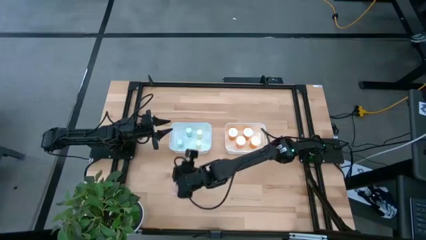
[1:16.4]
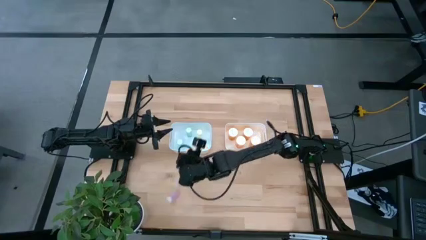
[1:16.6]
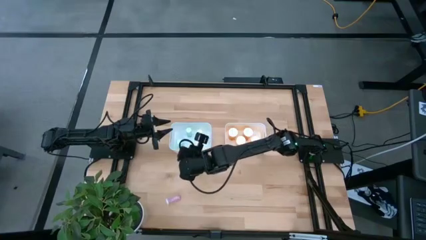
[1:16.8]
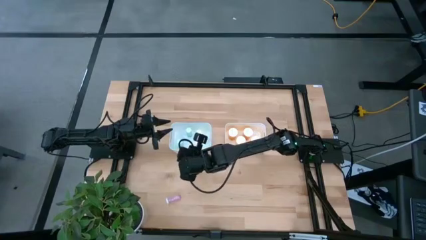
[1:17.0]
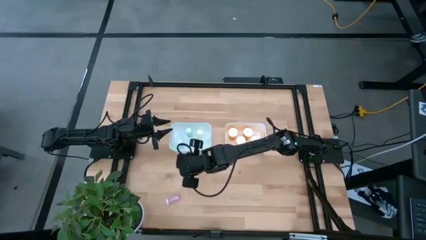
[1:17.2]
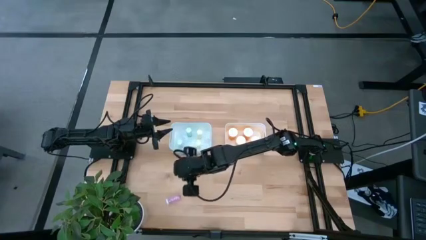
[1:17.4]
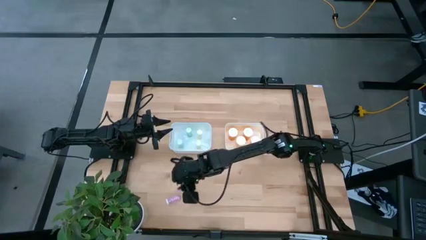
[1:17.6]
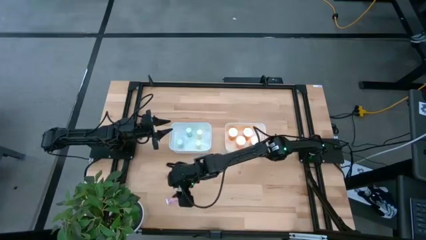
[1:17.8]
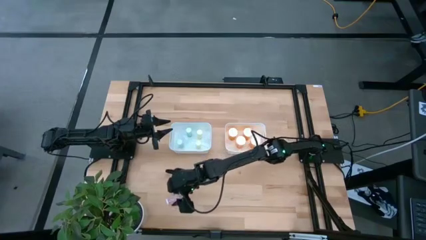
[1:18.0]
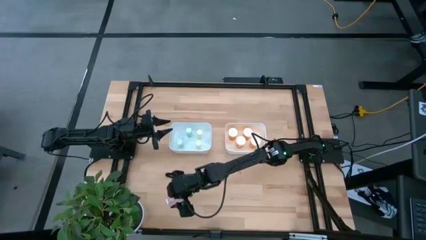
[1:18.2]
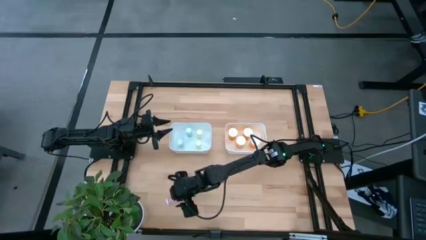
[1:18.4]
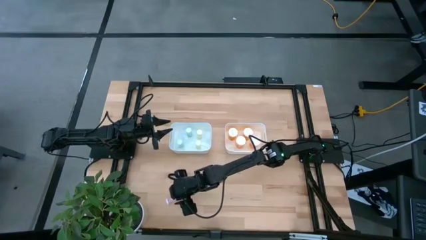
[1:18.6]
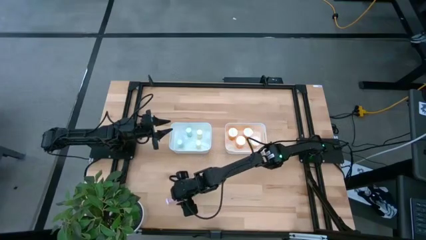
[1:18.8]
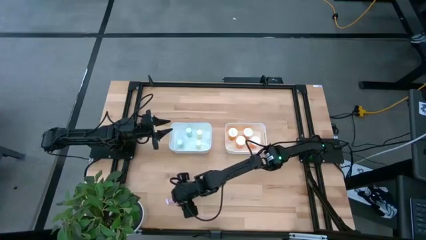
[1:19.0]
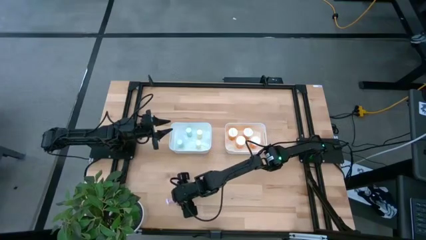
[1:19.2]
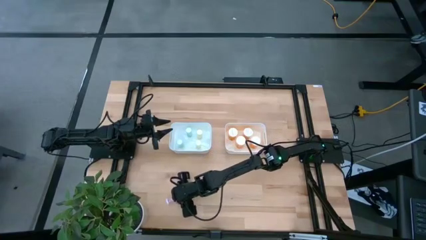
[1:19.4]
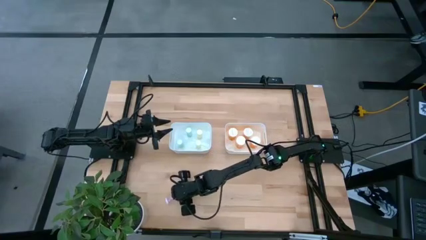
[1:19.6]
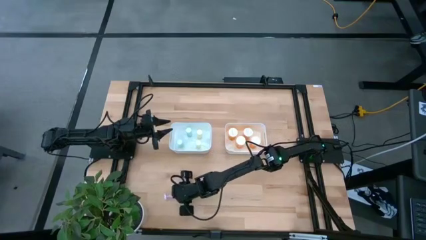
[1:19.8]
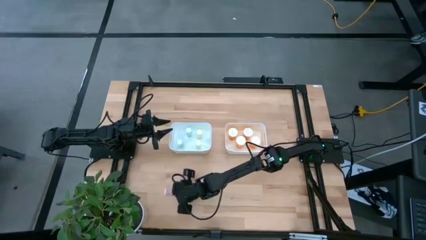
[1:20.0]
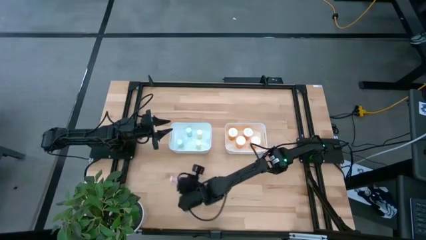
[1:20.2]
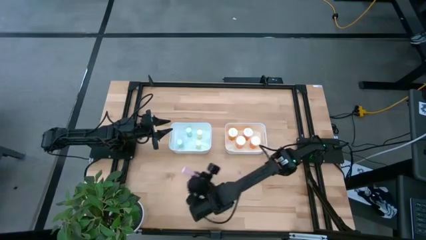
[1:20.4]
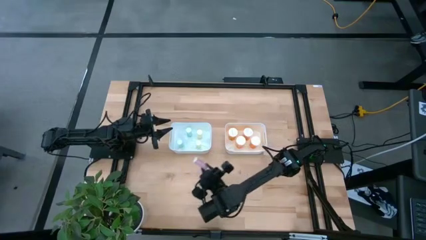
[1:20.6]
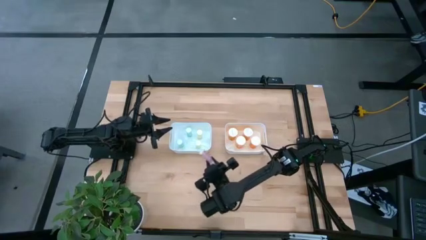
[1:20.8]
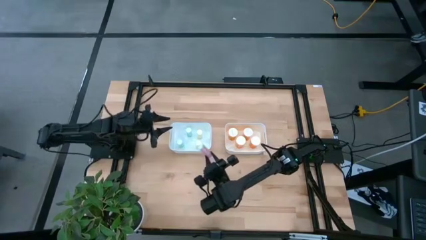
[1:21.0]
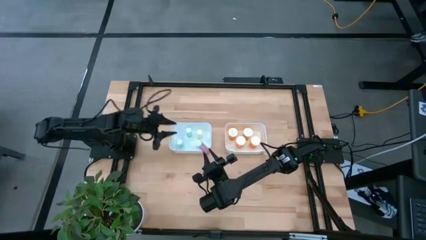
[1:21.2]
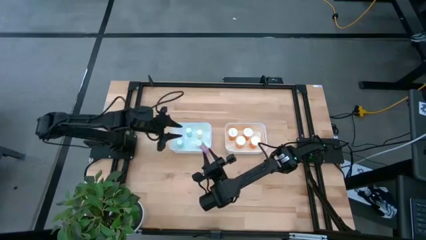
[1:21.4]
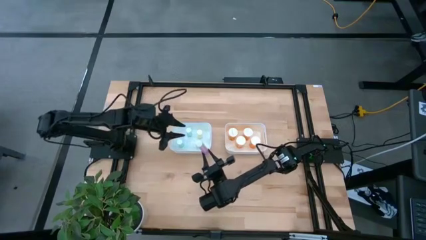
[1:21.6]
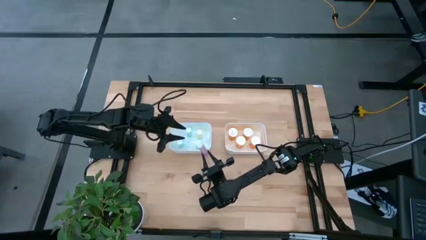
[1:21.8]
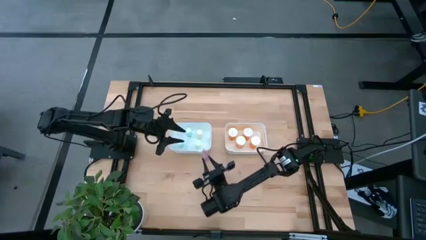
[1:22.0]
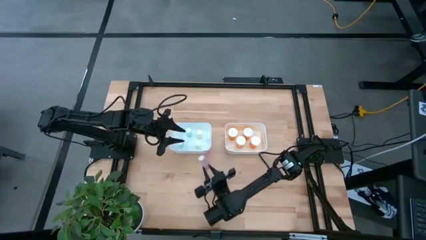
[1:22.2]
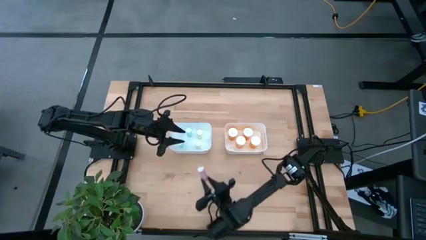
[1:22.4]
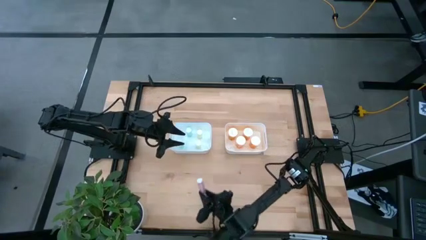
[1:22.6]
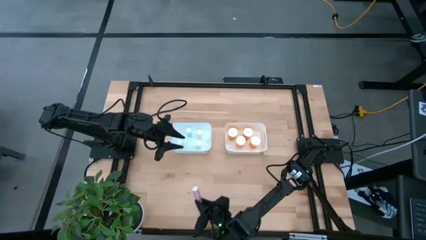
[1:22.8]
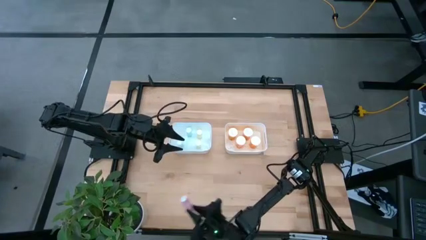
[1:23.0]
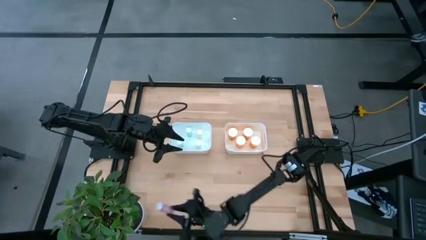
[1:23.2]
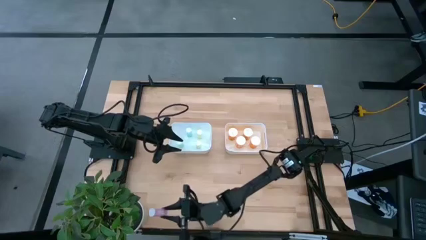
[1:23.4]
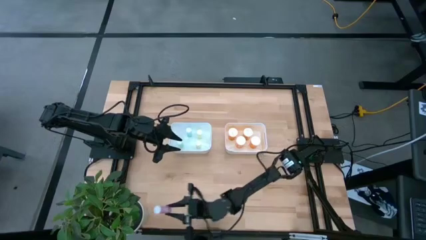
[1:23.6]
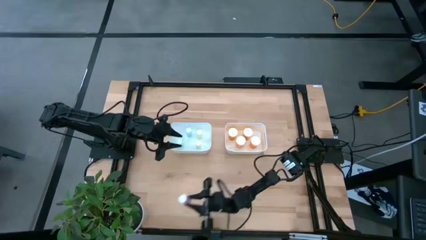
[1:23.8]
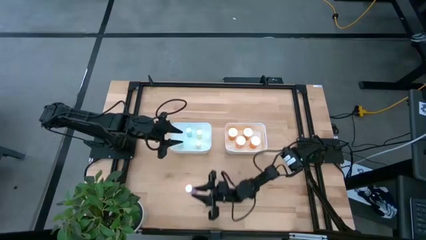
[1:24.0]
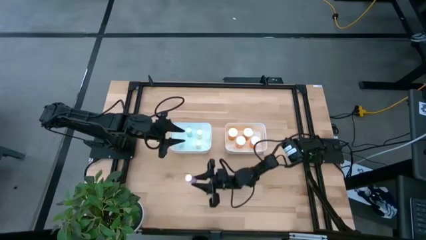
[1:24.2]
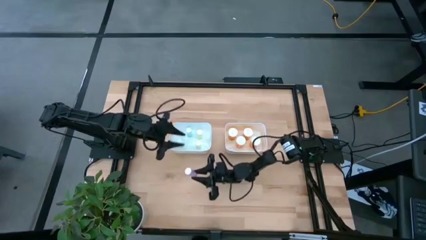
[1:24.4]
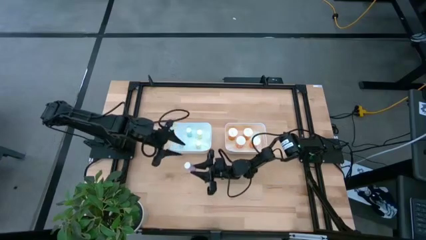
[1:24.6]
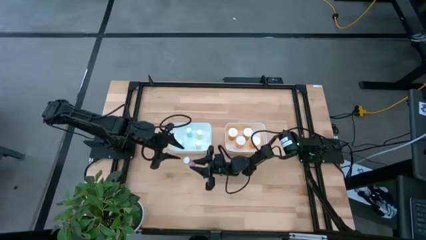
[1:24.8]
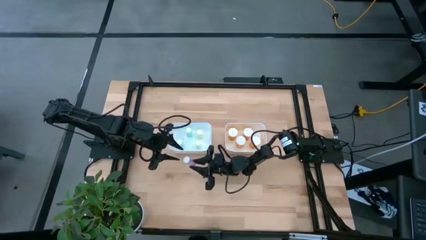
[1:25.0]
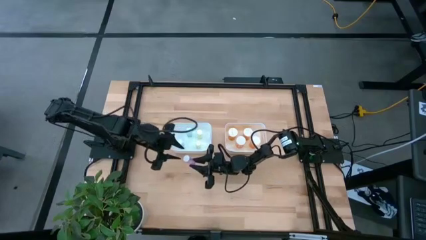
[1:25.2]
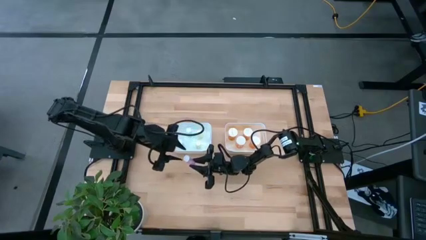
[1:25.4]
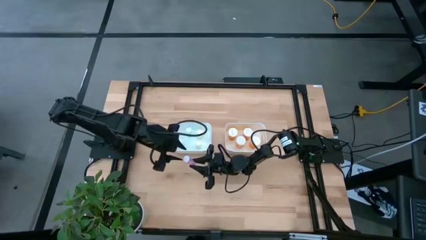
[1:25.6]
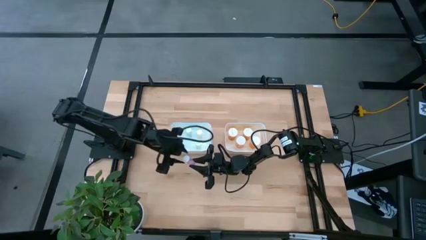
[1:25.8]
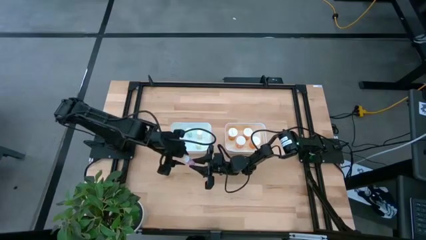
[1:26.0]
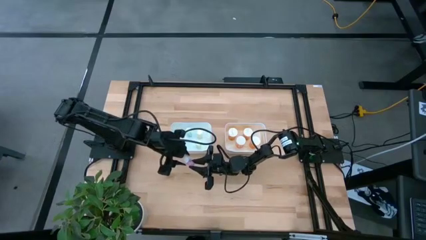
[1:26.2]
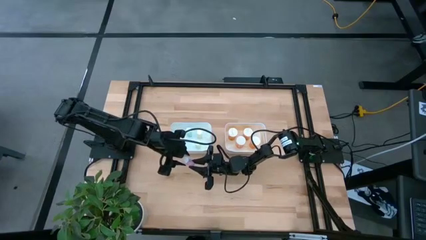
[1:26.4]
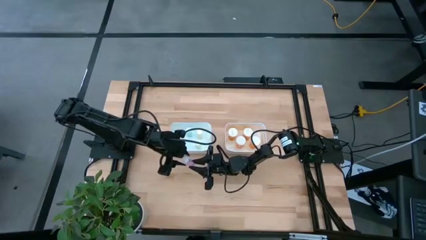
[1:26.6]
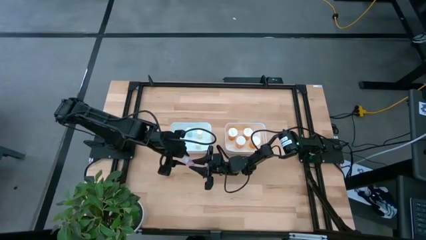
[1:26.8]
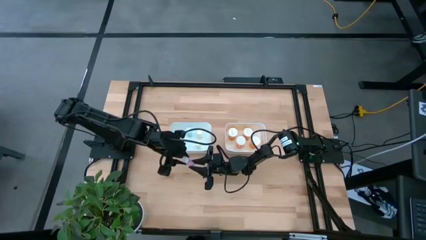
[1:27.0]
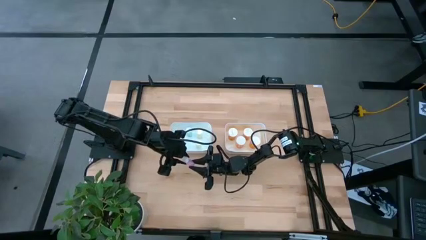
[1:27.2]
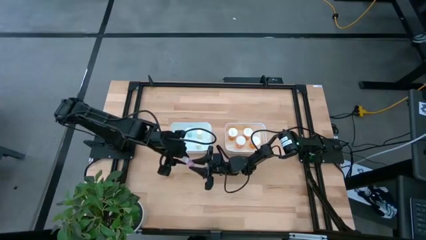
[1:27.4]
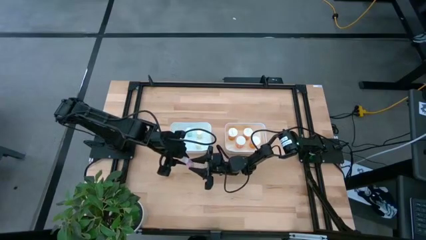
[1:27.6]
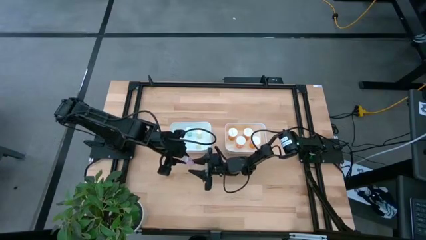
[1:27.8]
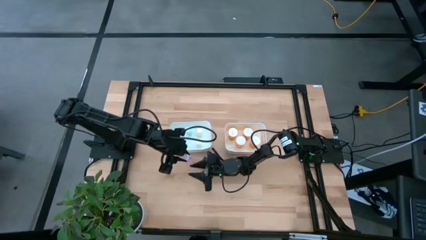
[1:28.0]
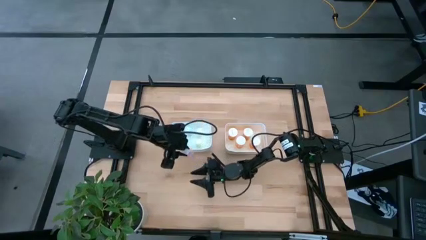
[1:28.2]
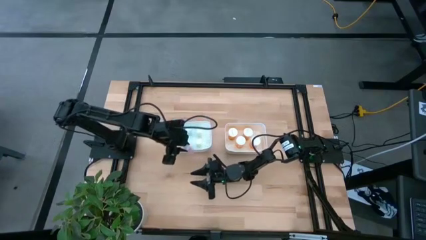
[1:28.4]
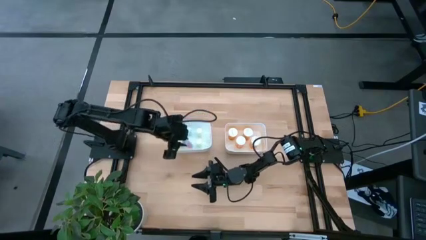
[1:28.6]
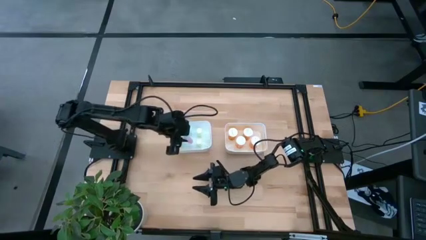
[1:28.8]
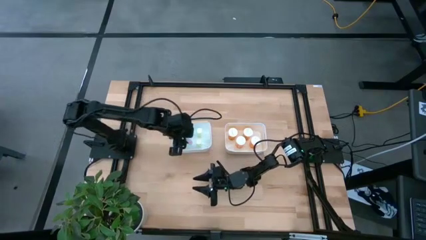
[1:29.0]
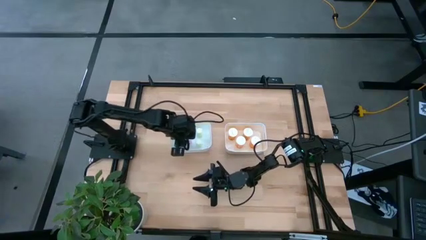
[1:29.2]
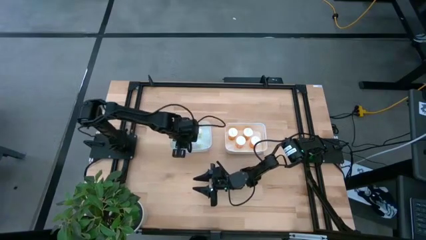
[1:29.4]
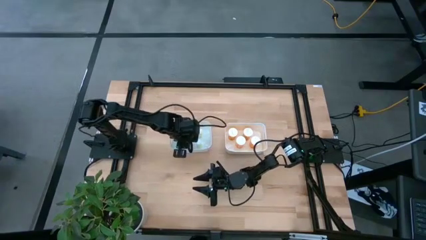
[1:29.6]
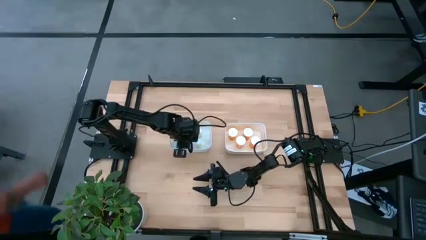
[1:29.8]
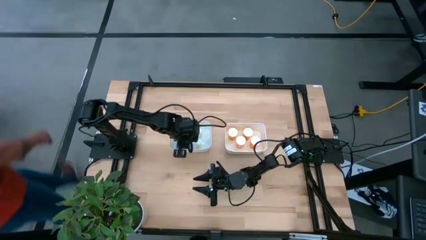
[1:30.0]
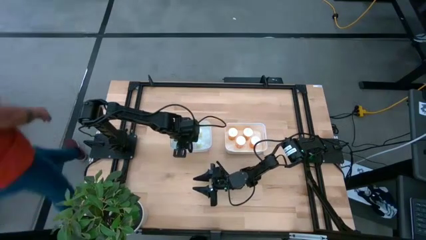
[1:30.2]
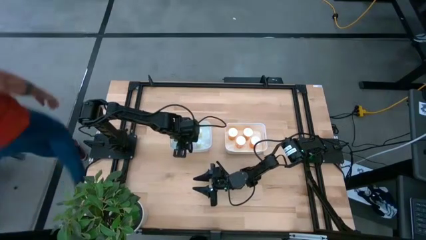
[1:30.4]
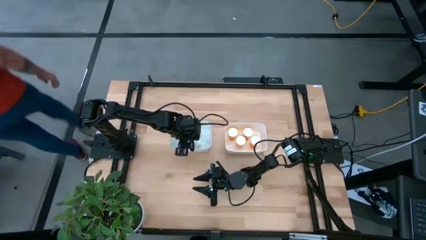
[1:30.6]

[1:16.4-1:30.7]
Task: Pick and place medicine bottles into bin by pill shape (circle, oval)
Put the small pink pill bottle into the left white bin
